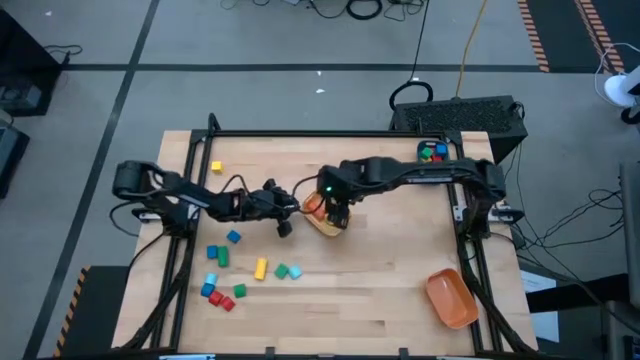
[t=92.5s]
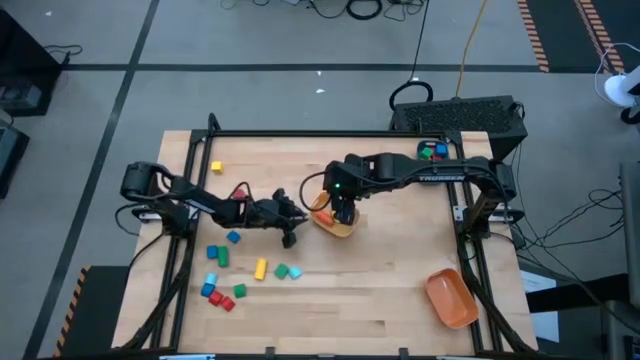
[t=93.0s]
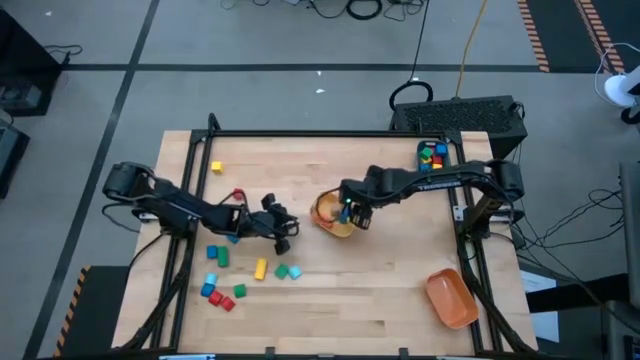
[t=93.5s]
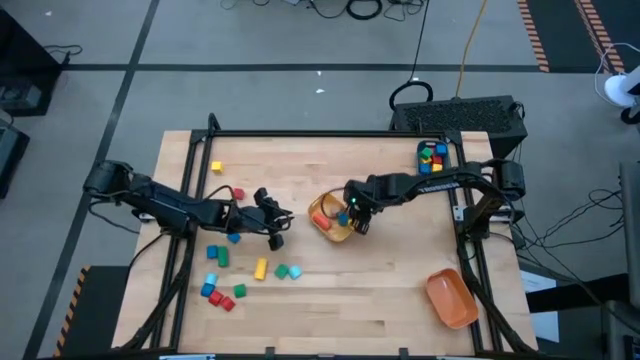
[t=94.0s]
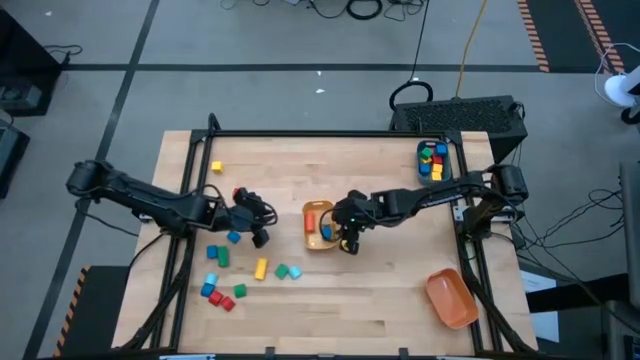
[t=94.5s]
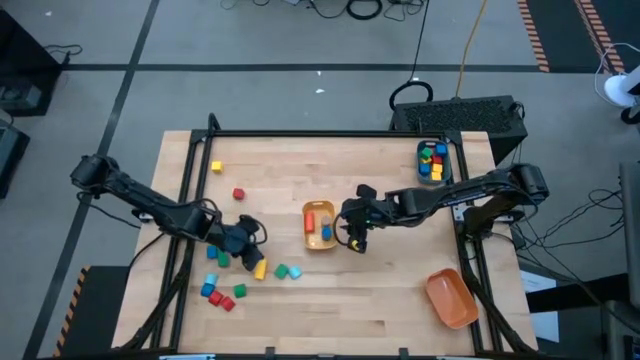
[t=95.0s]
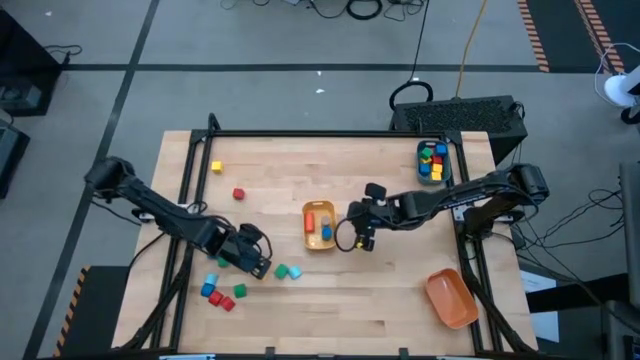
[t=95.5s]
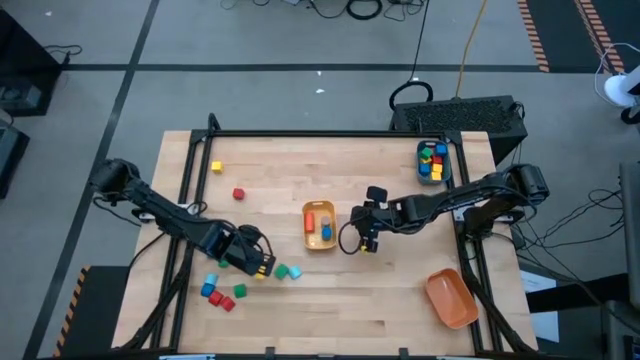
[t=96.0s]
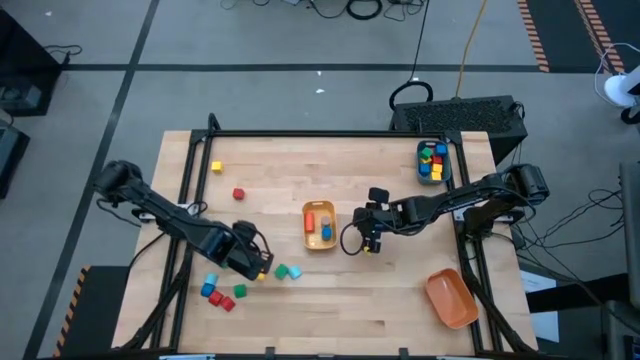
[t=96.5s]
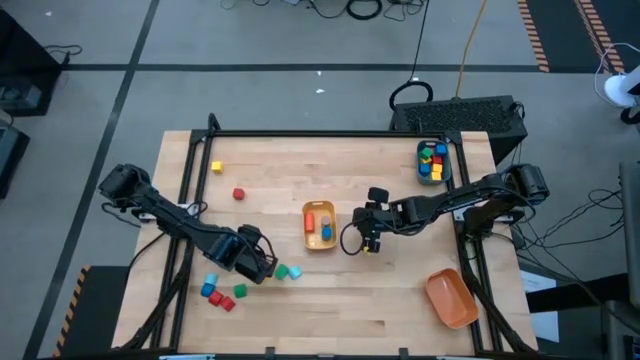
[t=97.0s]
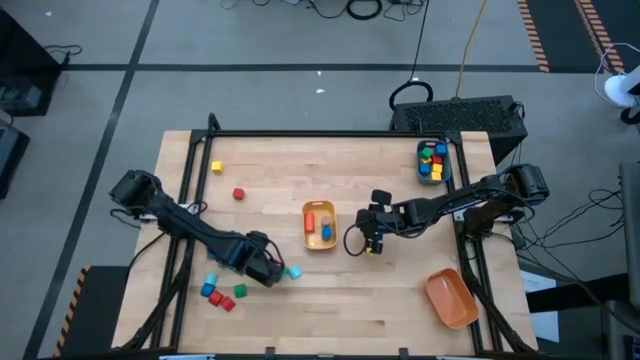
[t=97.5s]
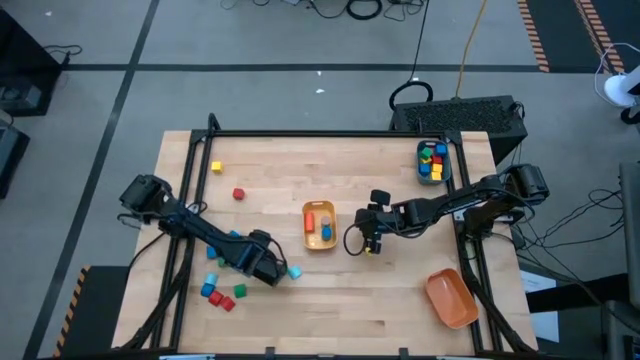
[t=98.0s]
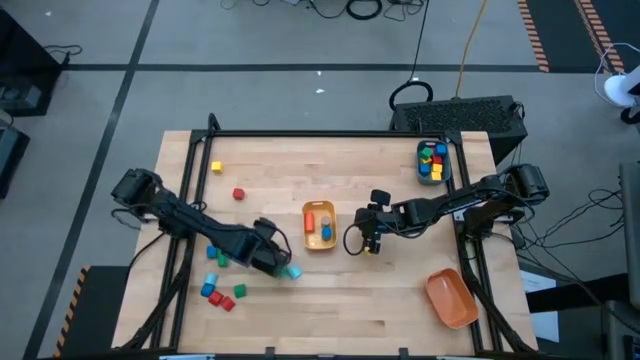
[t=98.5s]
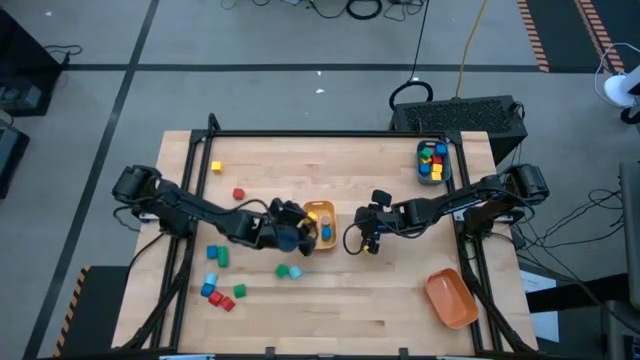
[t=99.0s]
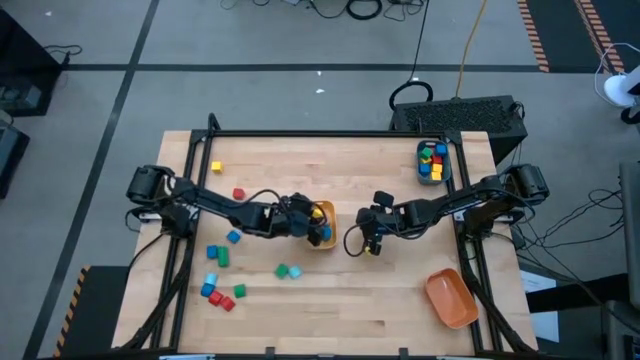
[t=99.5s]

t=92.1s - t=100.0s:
Task: Sort blocks by size
Put the yellow cylindrical block into the yellow bin

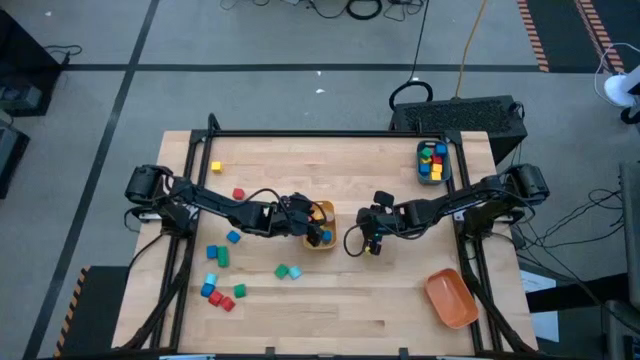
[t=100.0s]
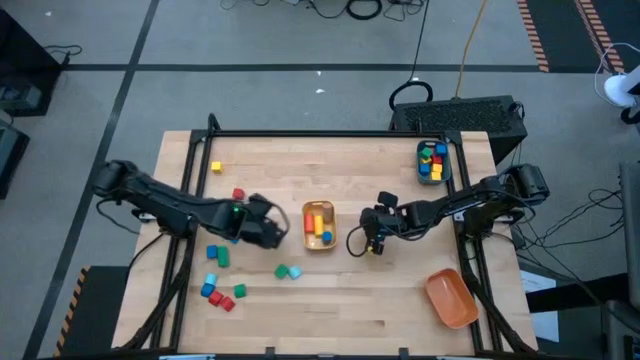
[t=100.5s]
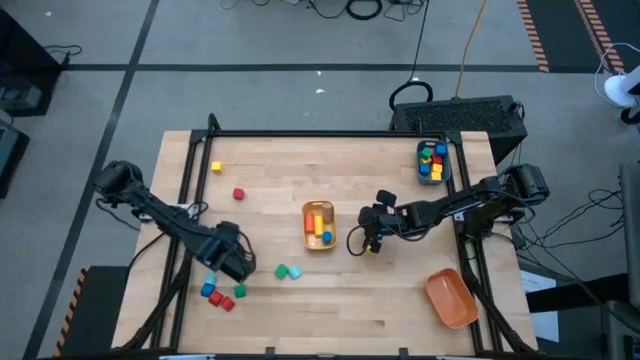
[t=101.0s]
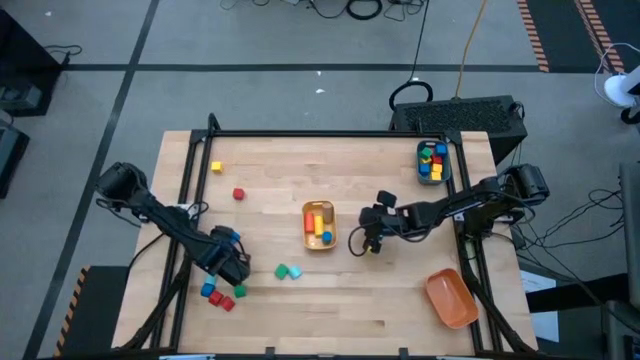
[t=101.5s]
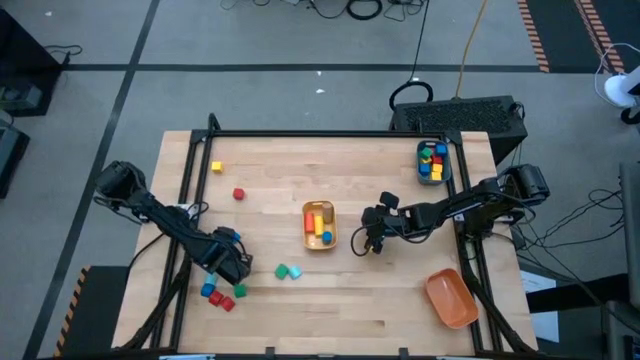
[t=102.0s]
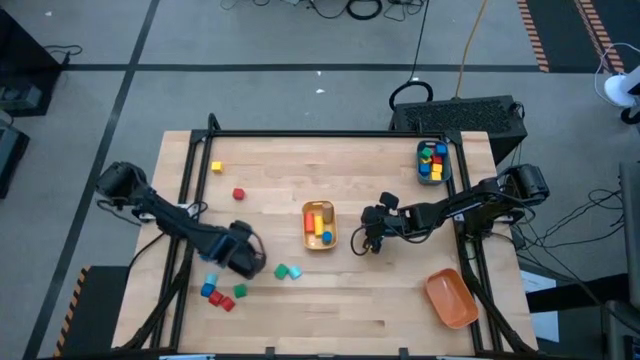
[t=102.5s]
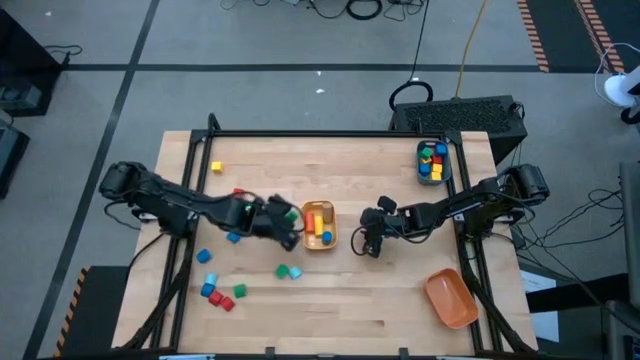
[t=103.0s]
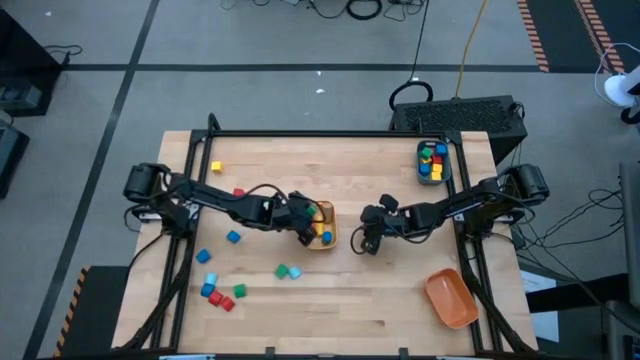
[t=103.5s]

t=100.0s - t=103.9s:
Put the green cylindrical block into the yellow bin

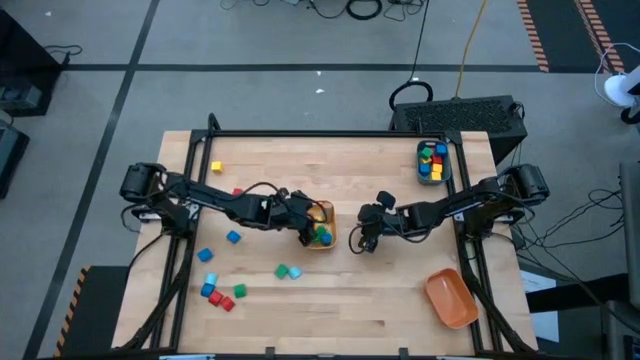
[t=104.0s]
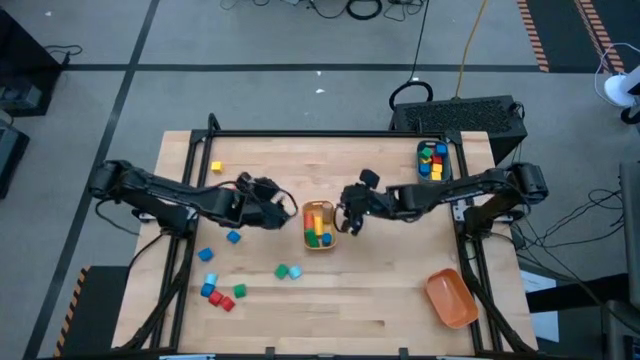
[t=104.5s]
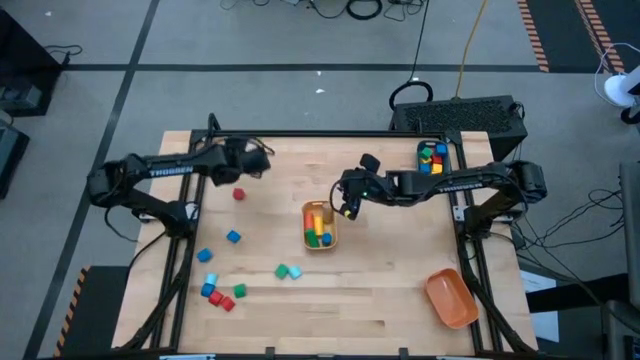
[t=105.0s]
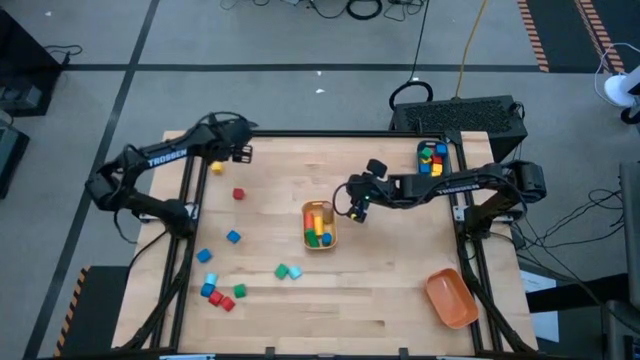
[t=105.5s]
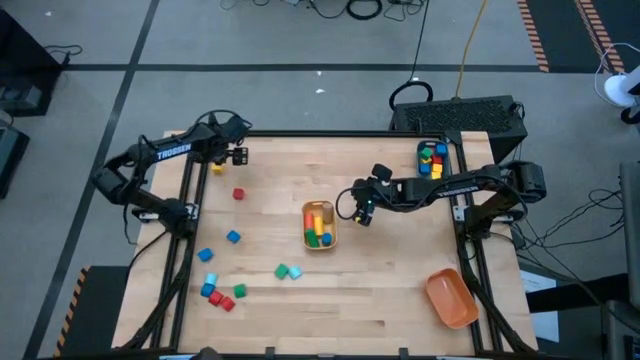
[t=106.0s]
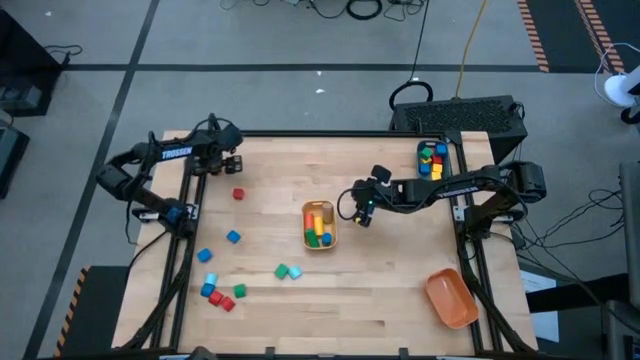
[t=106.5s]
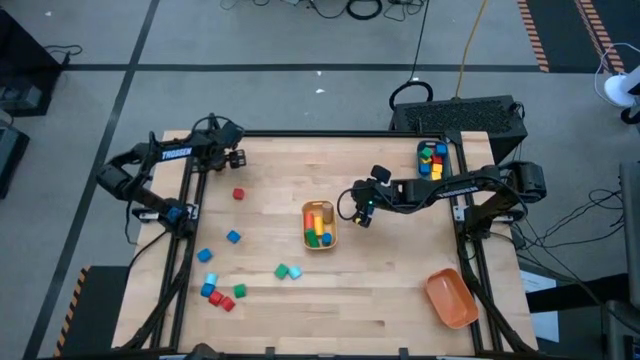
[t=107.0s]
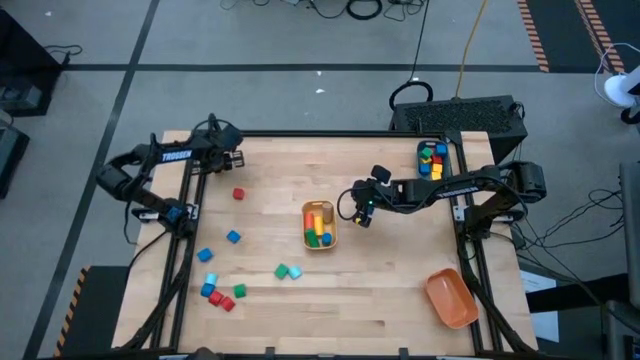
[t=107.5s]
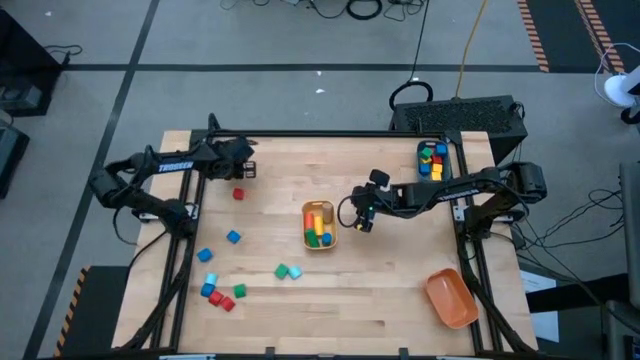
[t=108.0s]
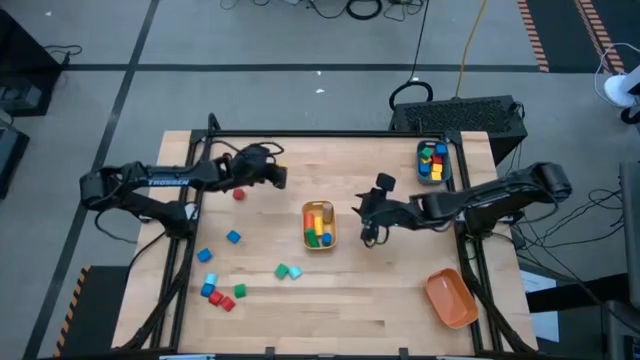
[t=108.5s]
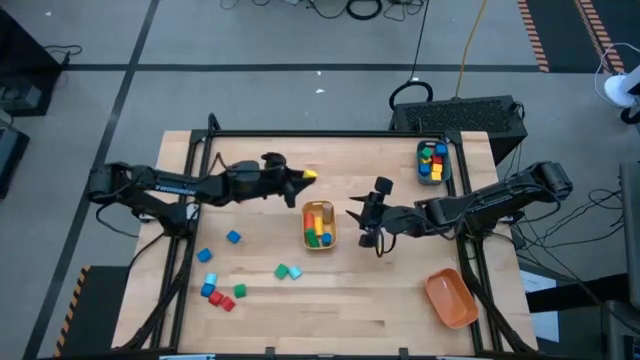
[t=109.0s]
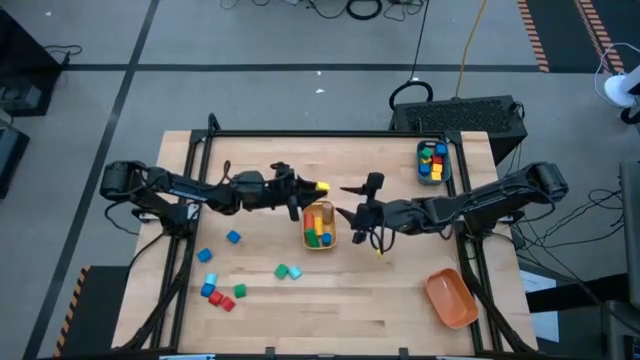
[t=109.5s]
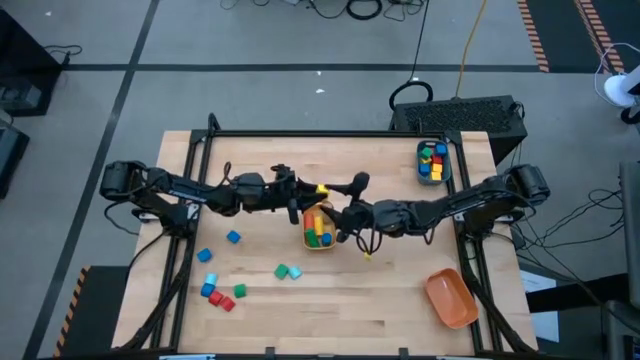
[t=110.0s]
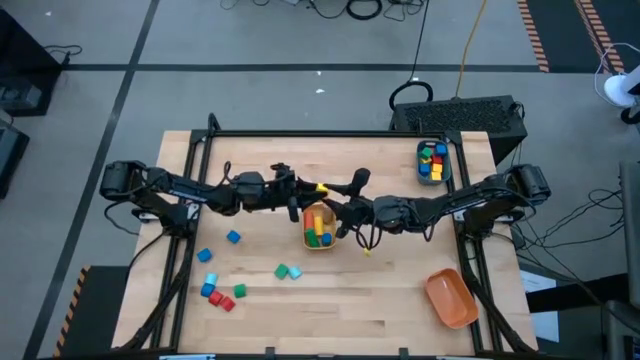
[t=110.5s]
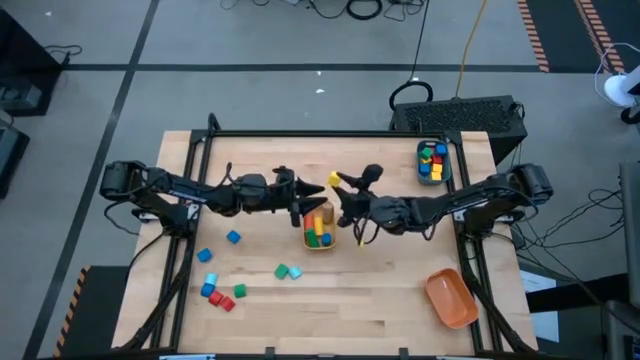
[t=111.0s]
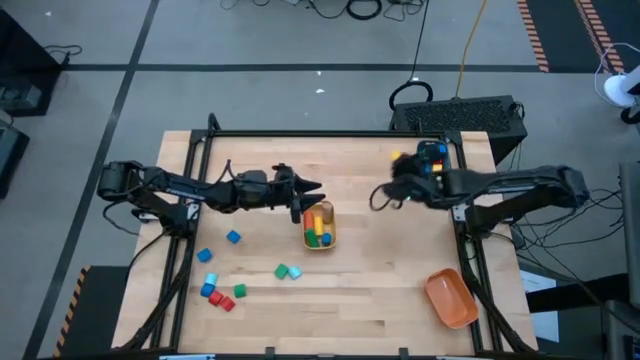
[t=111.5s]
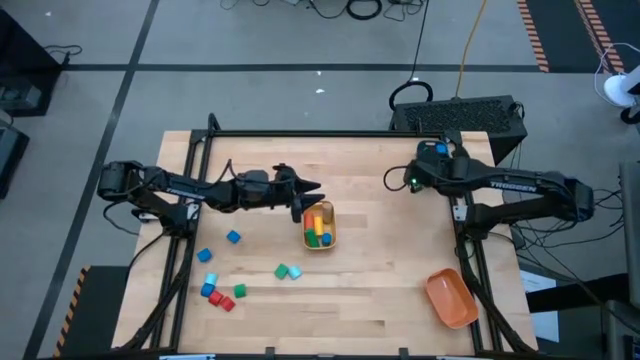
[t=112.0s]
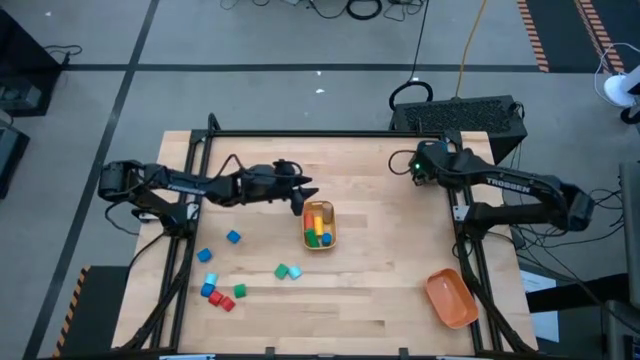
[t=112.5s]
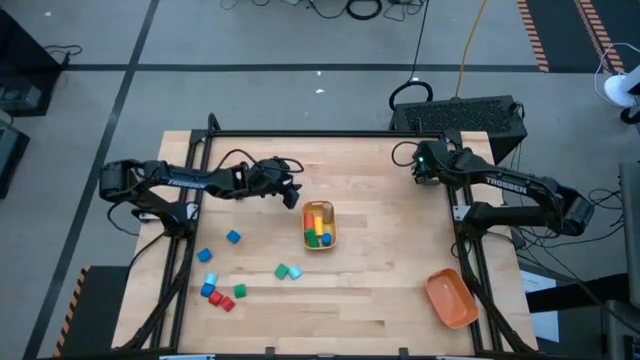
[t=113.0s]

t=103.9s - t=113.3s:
Put the yellow square block into the blue bin
